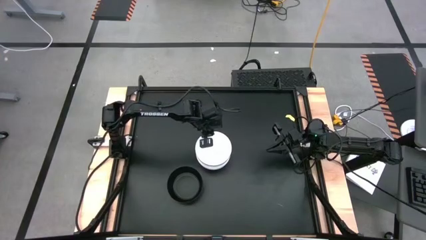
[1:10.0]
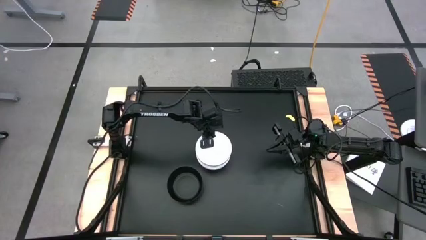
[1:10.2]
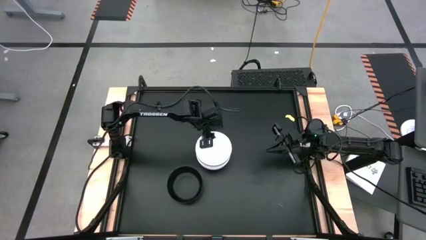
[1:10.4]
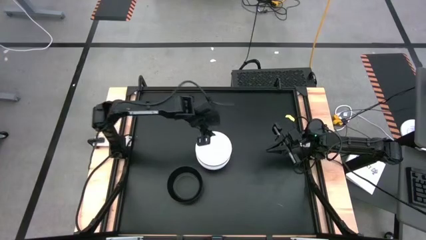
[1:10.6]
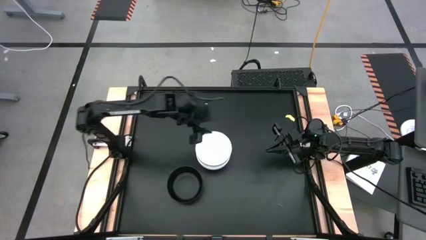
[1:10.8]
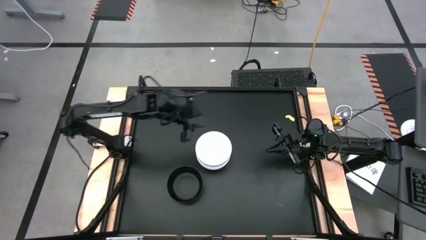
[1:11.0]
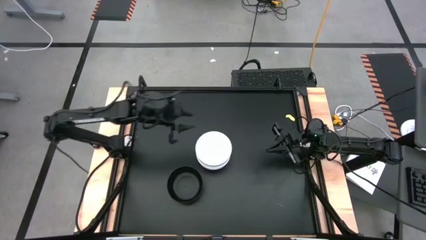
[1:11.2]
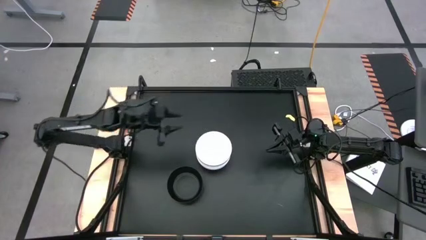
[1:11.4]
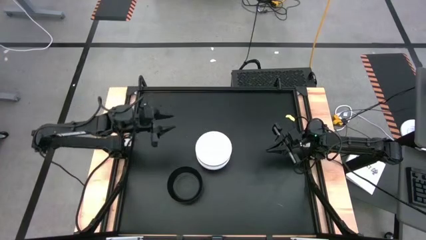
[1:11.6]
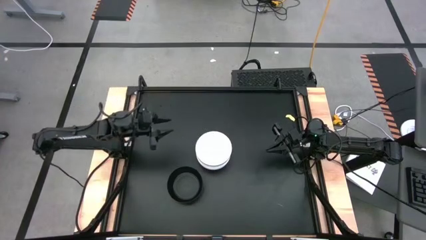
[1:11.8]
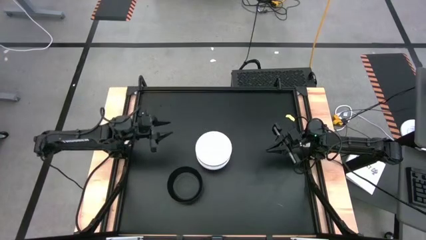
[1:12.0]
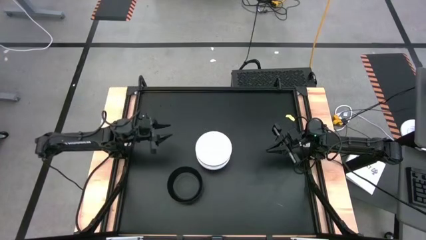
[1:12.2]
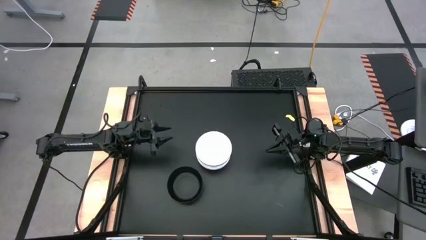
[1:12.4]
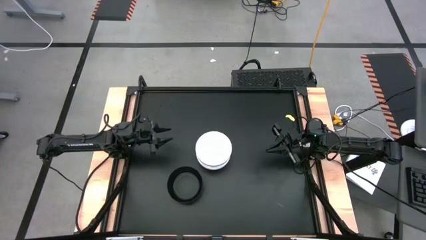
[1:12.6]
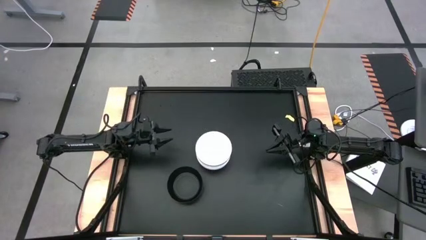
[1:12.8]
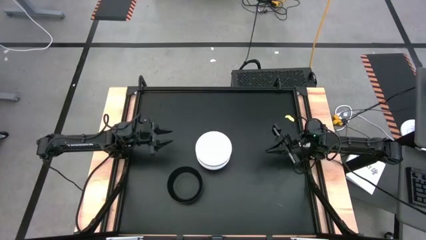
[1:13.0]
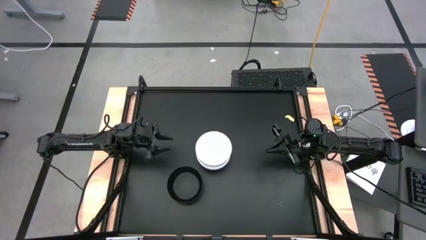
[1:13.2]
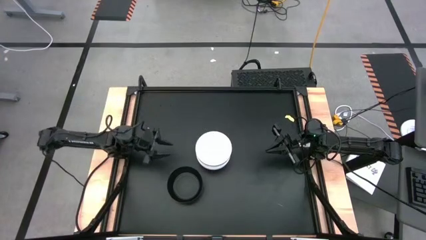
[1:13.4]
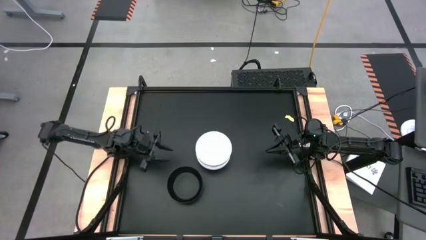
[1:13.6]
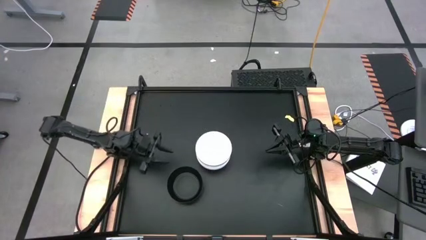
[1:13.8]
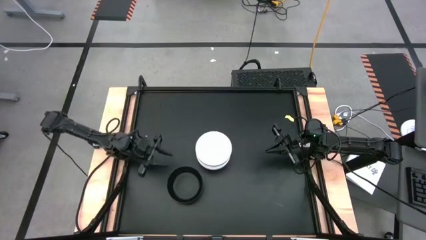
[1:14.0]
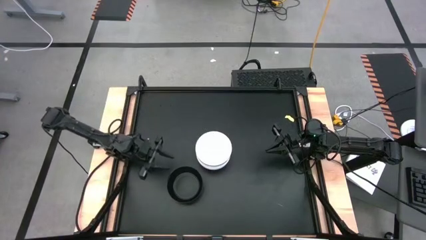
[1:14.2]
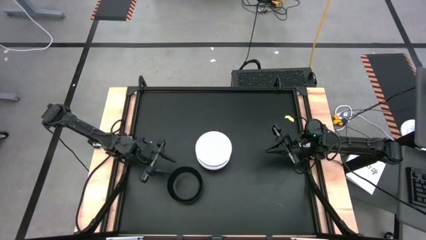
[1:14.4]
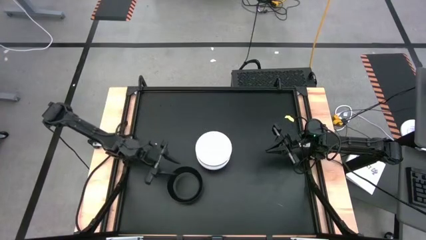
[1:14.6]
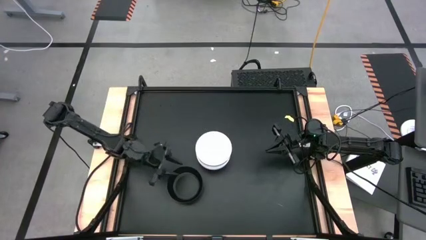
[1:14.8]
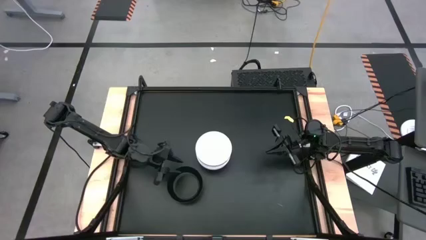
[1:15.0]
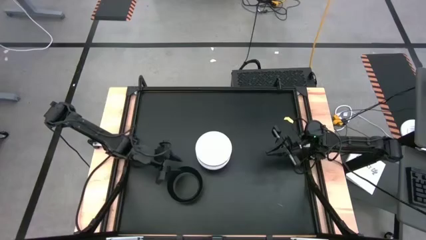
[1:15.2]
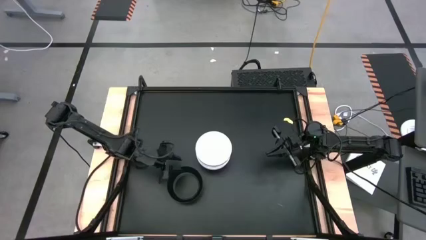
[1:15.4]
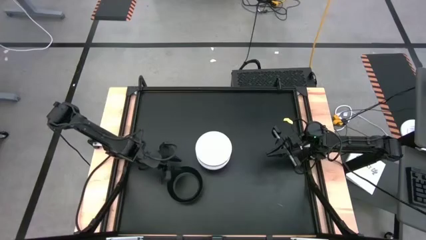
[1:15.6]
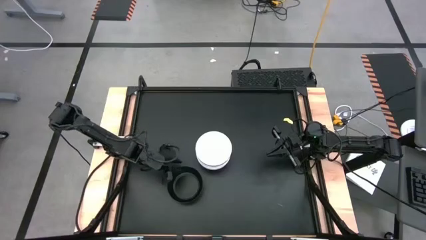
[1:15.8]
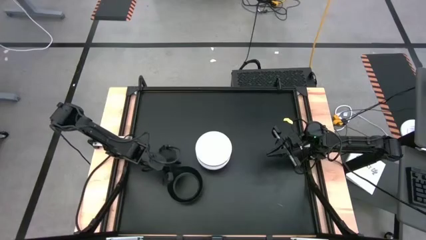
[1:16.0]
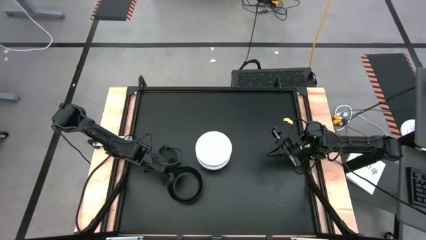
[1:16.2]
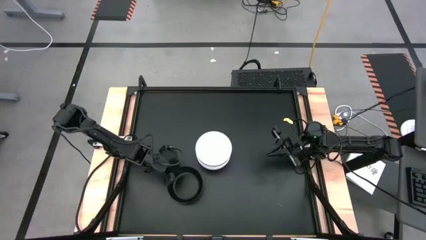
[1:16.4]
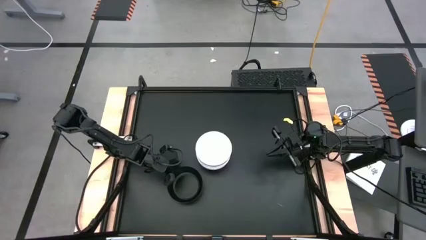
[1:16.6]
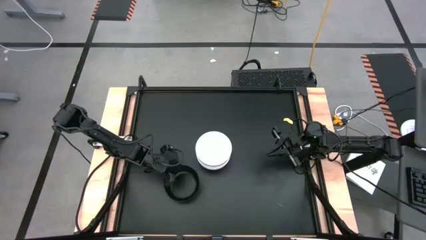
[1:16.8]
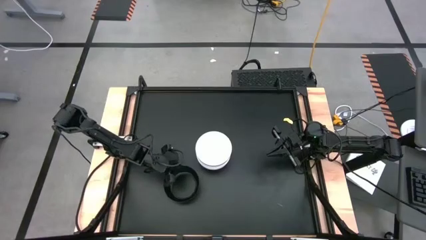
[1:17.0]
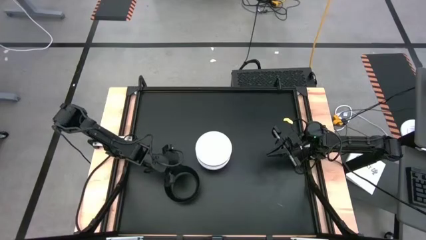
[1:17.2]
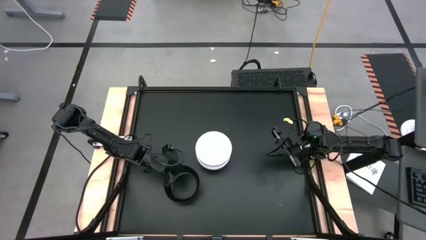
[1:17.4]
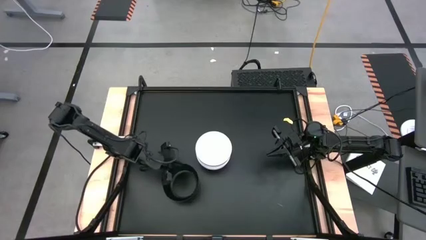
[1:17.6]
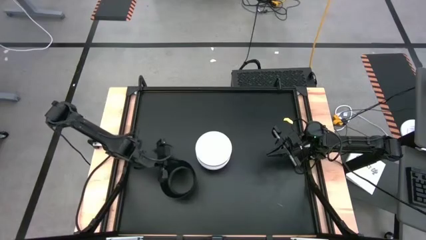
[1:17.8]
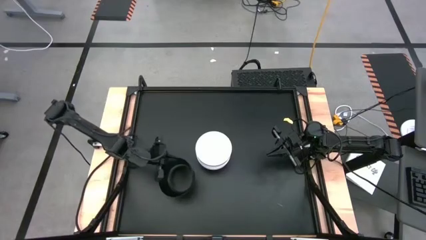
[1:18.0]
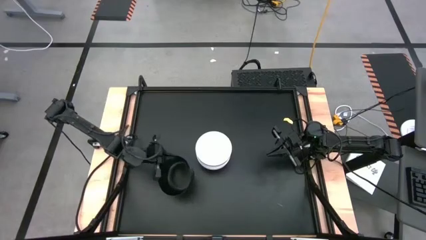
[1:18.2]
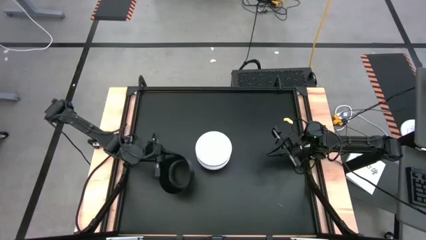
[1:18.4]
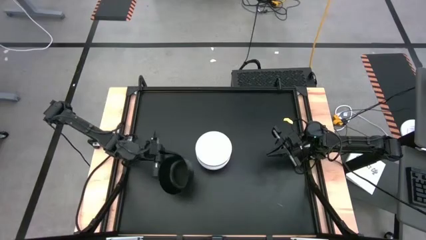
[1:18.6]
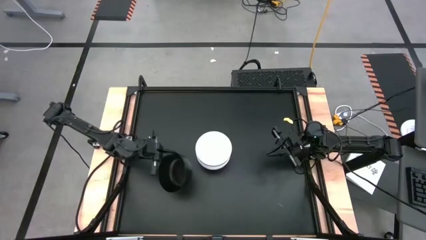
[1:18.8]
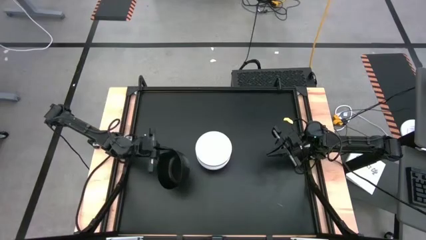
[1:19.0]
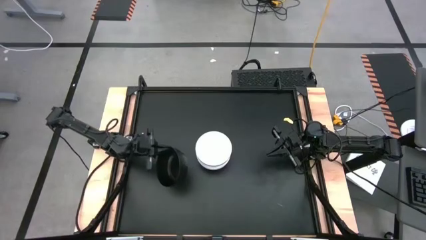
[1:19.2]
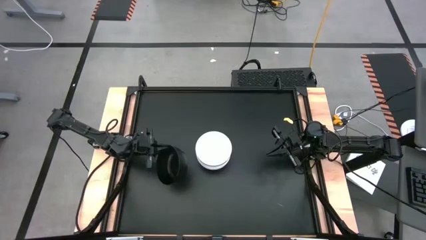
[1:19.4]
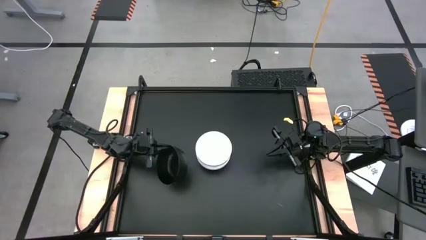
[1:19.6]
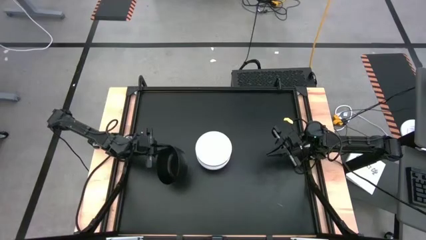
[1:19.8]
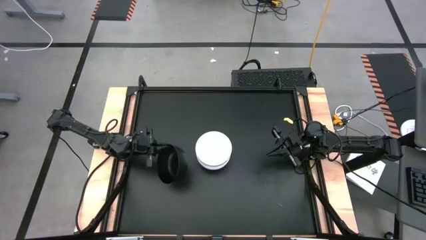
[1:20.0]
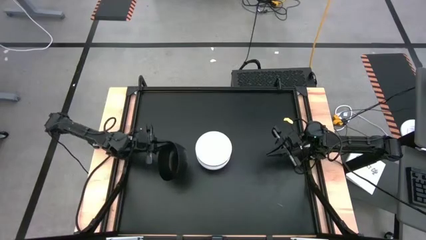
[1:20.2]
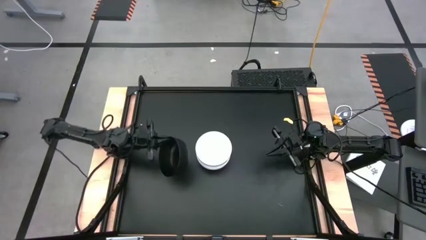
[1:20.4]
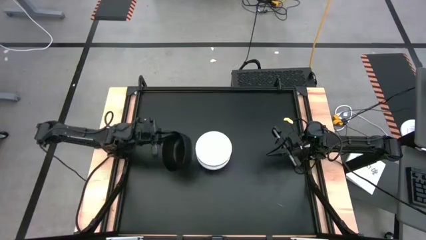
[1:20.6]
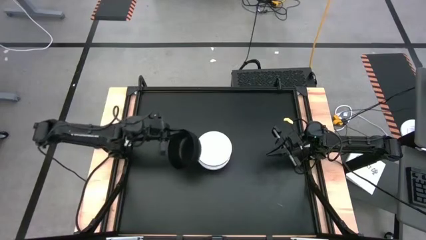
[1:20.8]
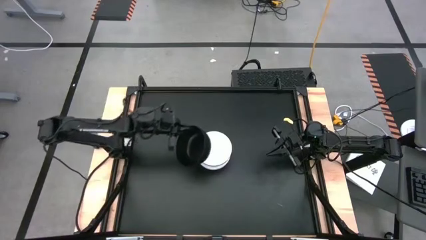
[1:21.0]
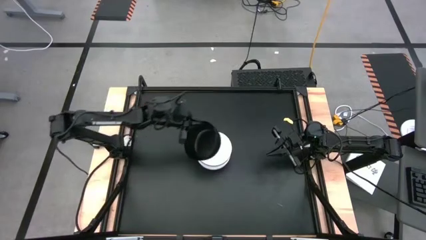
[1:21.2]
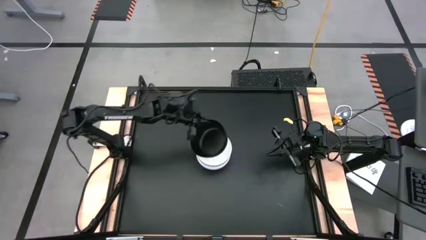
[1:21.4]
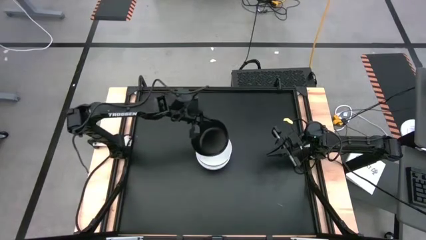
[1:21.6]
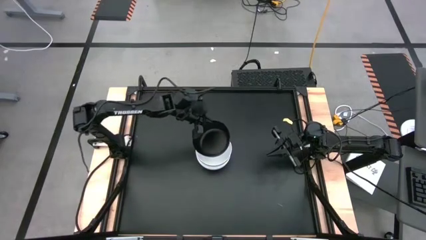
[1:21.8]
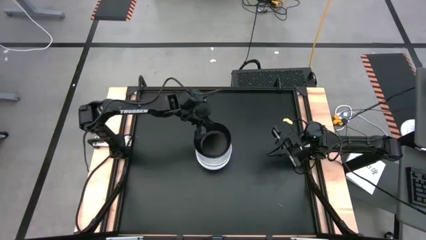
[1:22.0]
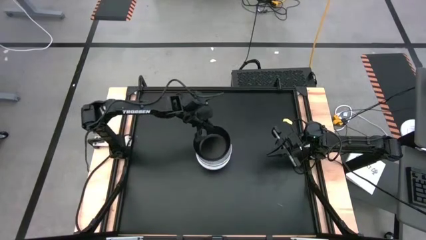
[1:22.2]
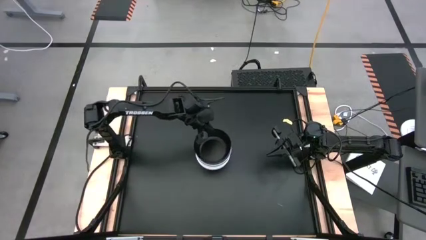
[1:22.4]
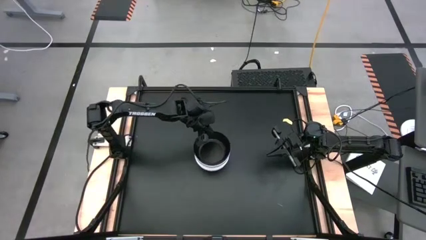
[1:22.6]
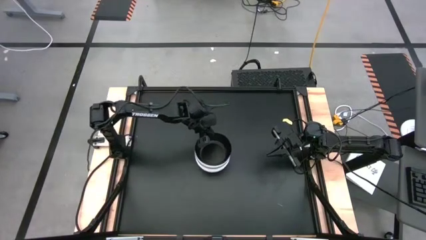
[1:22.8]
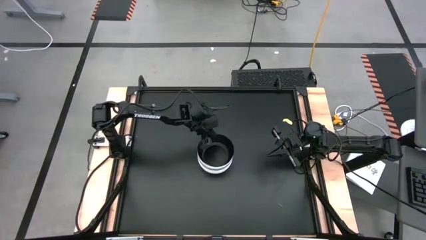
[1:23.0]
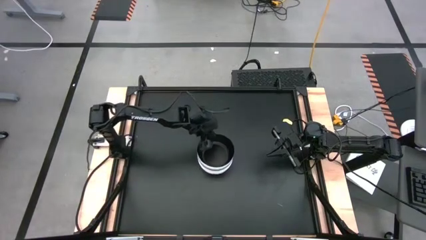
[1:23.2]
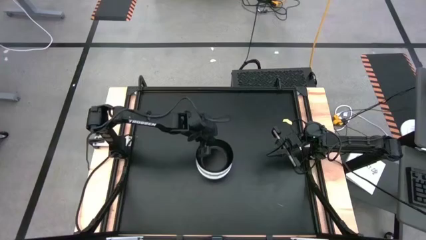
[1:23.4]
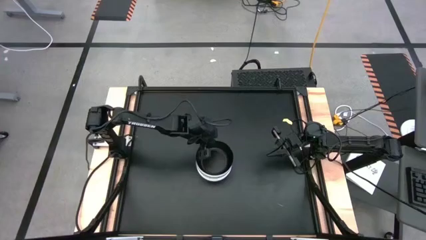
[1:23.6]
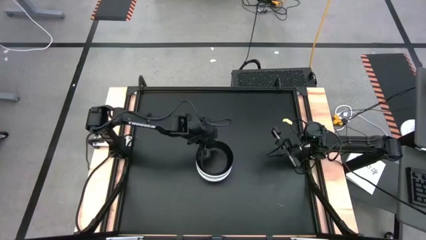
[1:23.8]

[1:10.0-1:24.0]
Task: Nest bowls inside each other
Stack the black bowl into the white bowl

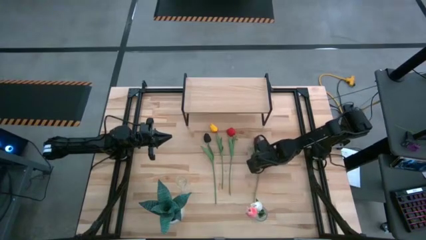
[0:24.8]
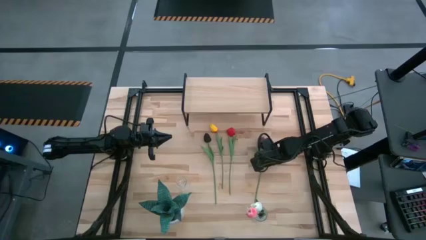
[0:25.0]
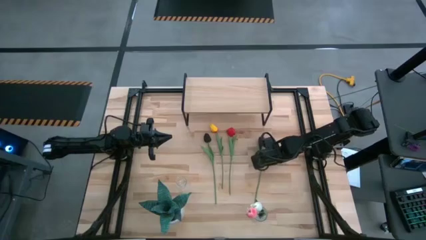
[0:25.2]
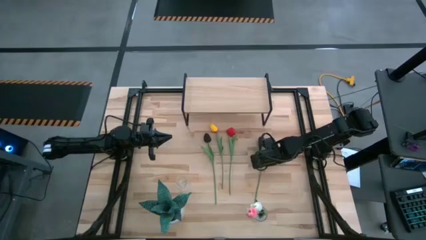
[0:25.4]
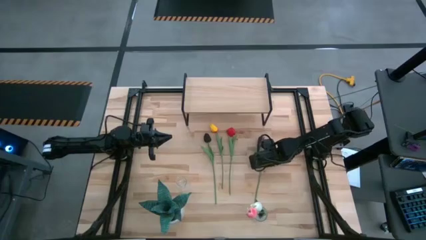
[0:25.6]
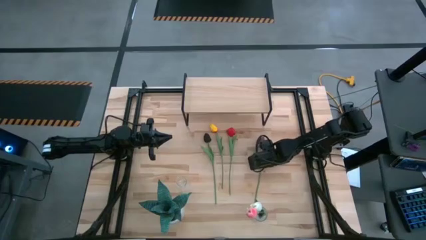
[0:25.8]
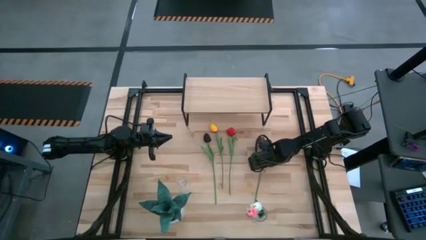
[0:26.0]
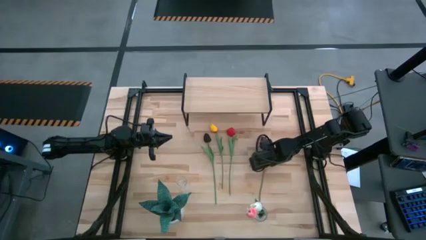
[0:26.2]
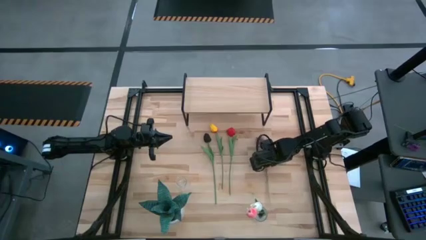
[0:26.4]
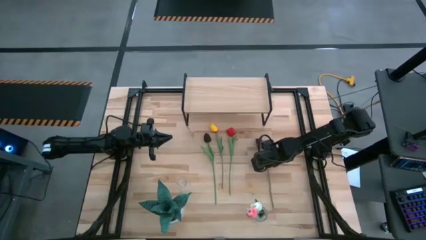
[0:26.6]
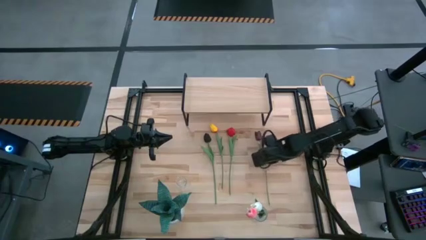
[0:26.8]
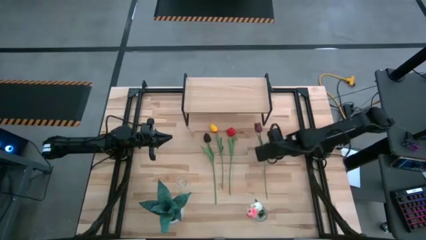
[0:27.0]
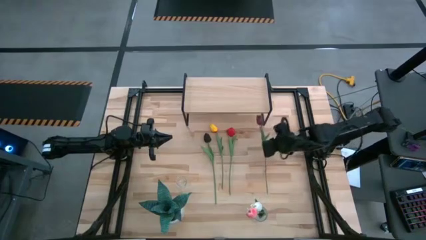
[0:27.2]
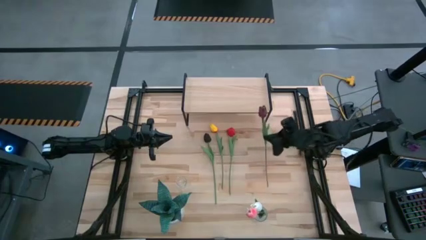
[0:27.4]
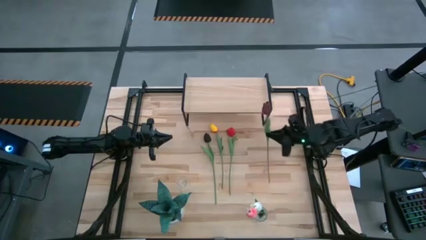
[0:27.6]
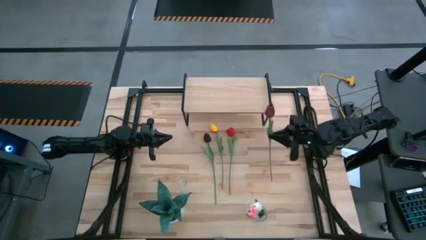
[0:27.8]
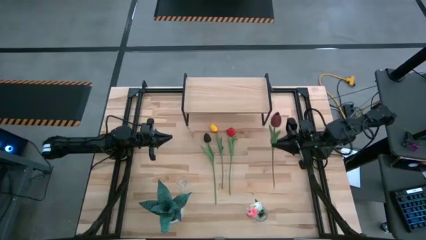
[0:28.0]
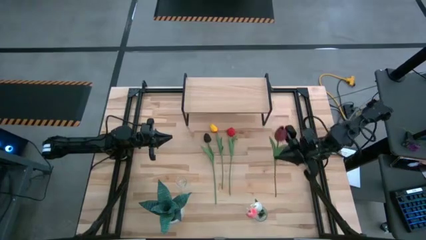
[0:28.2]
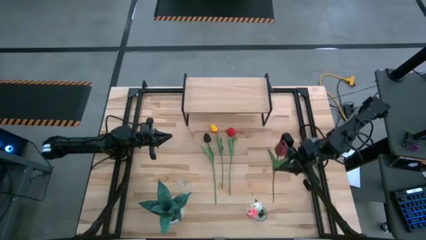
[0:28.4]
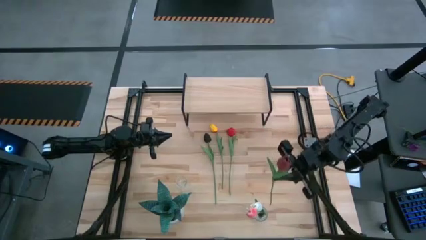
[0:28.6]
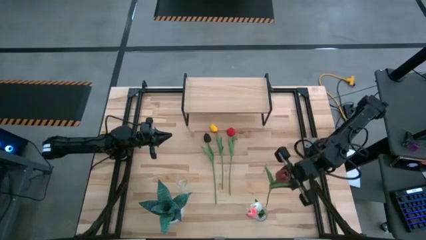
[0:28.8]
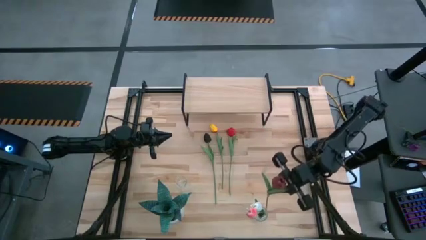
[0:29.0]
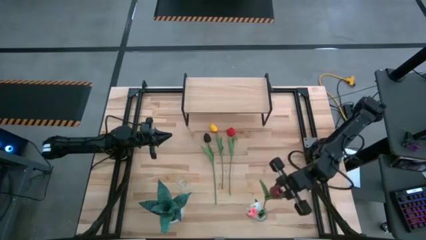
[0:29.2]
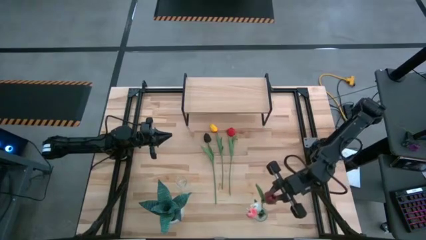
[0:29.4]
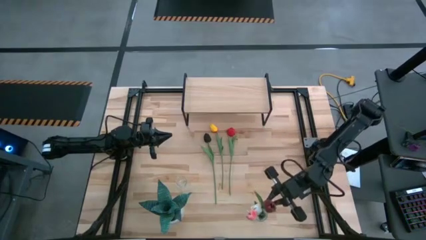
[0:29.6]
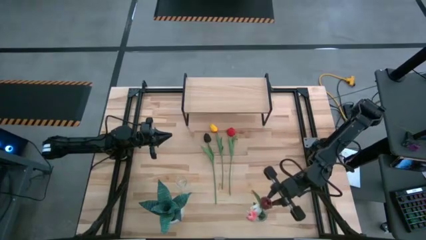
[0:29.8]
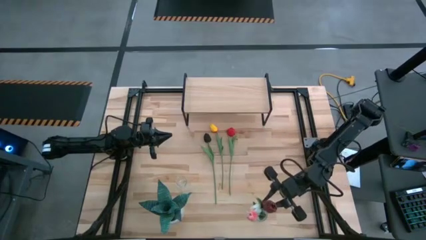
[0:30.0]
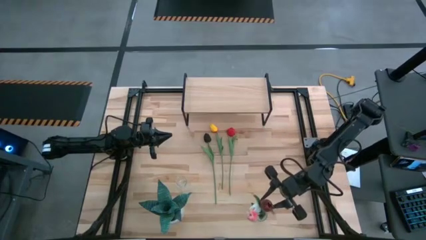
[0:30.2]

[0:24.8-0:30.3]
Task: Pick and place flowers into a vace then onto a shelf
Put the dark red flower into the bottom transparent vase
